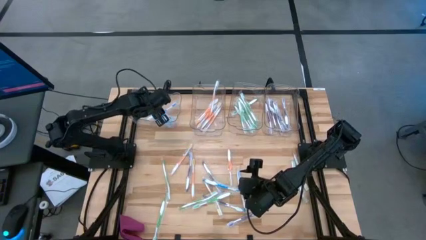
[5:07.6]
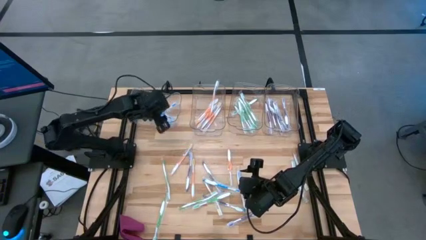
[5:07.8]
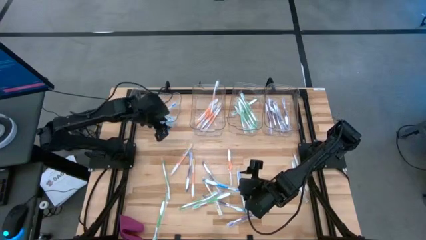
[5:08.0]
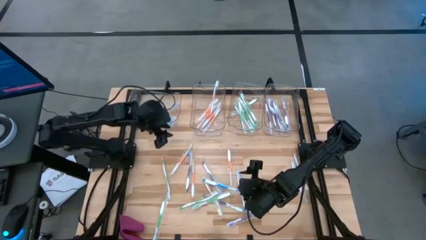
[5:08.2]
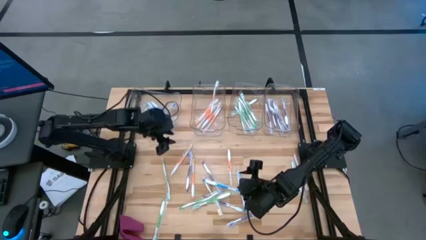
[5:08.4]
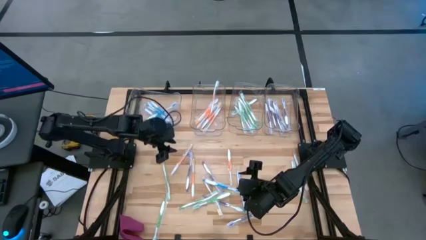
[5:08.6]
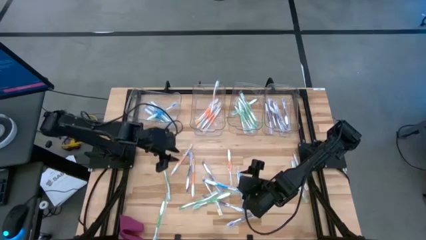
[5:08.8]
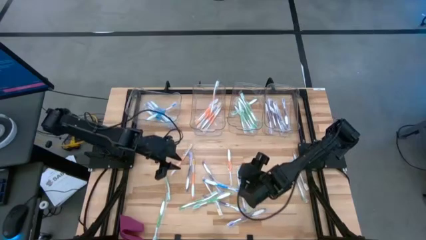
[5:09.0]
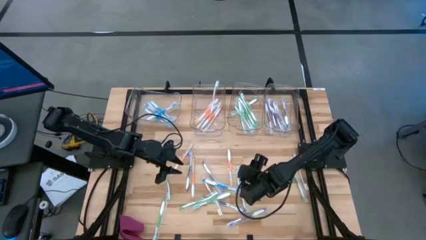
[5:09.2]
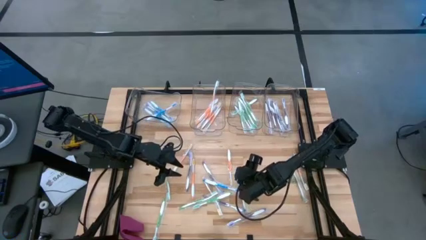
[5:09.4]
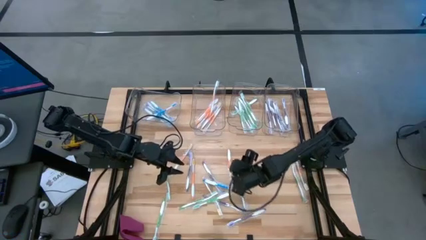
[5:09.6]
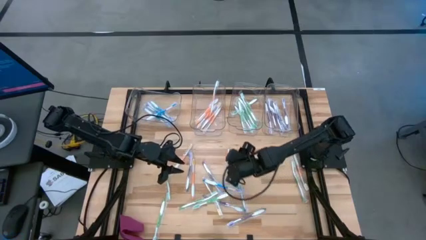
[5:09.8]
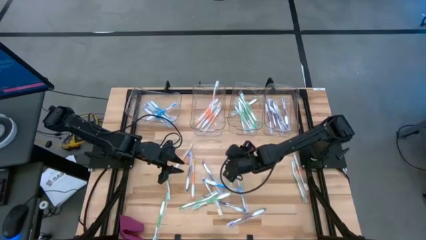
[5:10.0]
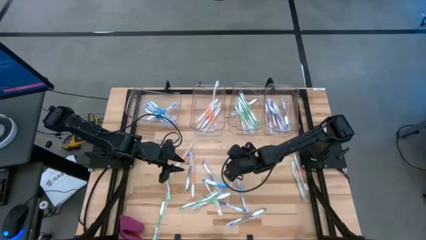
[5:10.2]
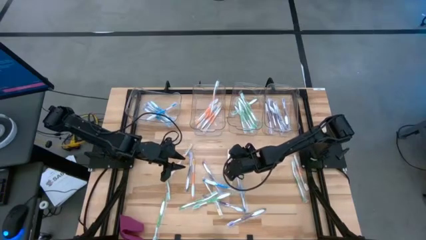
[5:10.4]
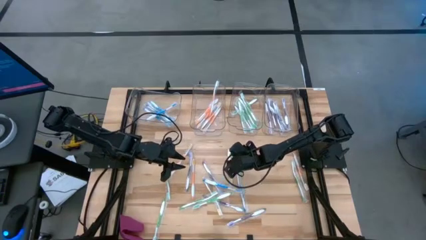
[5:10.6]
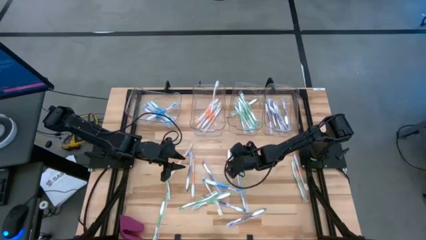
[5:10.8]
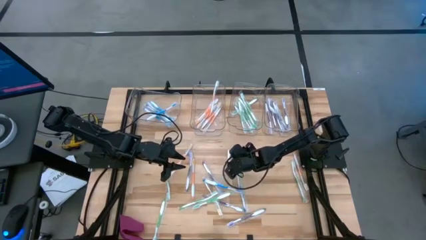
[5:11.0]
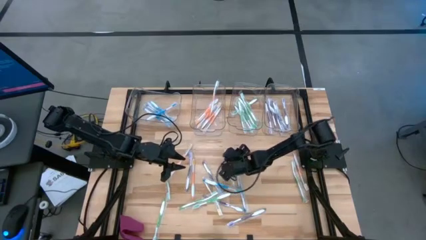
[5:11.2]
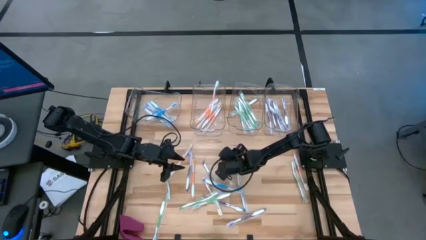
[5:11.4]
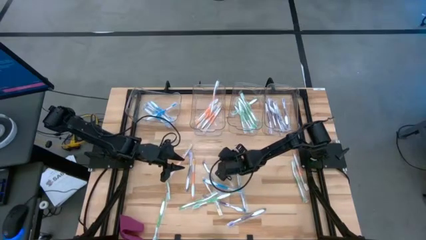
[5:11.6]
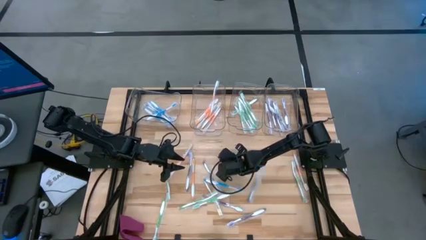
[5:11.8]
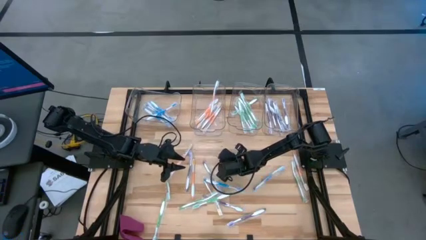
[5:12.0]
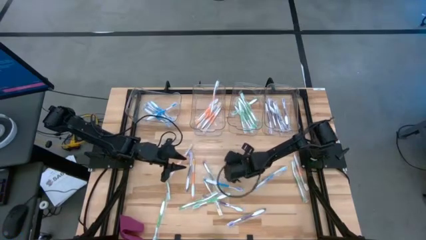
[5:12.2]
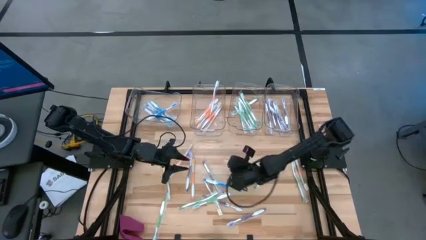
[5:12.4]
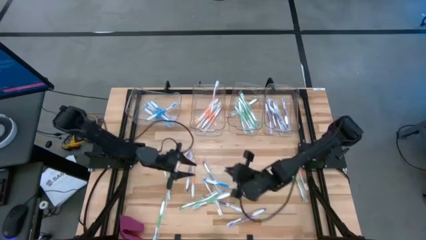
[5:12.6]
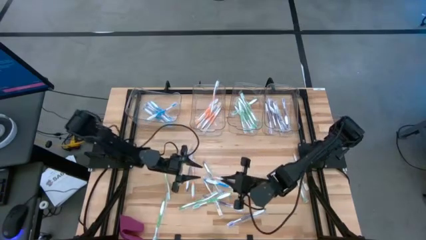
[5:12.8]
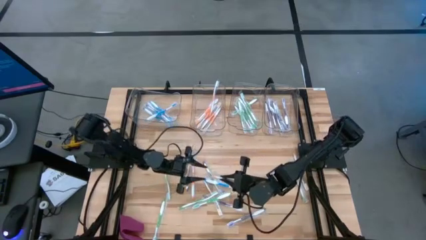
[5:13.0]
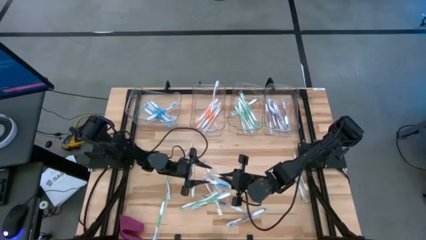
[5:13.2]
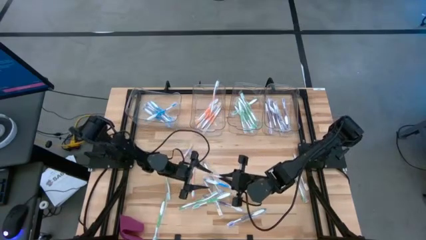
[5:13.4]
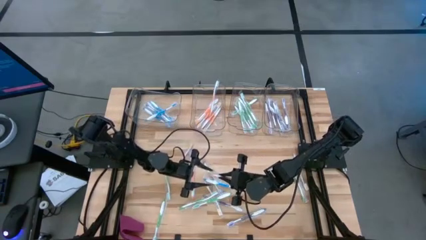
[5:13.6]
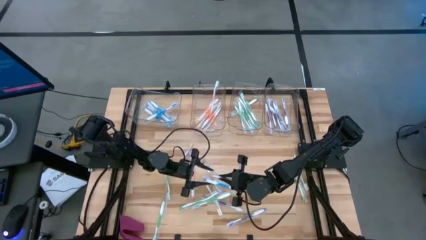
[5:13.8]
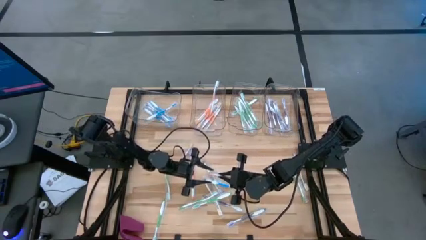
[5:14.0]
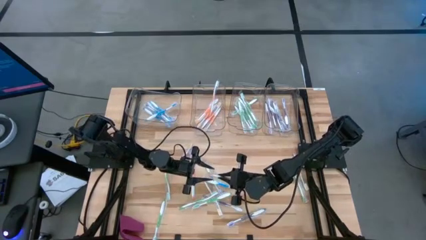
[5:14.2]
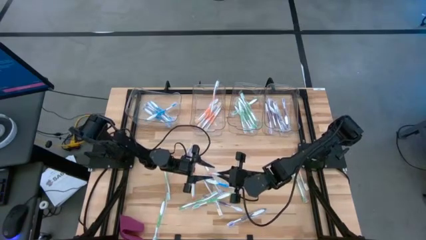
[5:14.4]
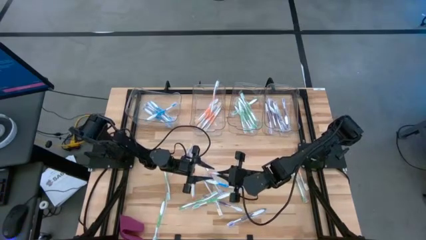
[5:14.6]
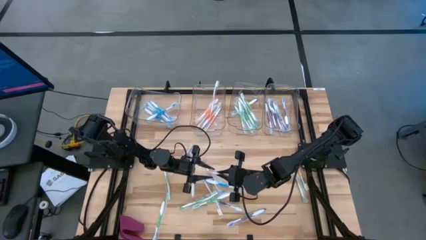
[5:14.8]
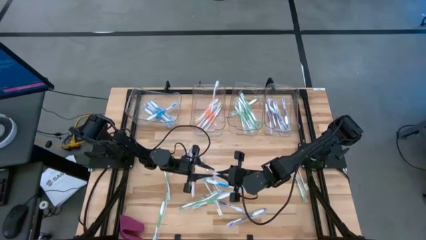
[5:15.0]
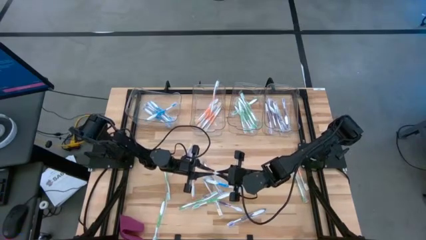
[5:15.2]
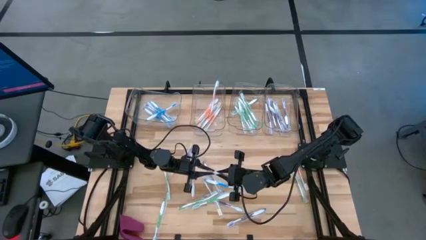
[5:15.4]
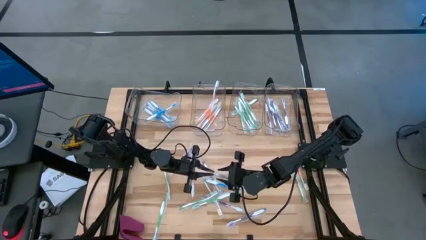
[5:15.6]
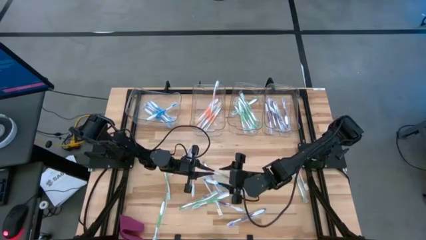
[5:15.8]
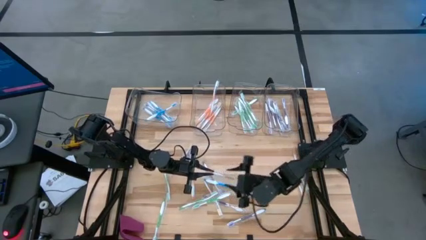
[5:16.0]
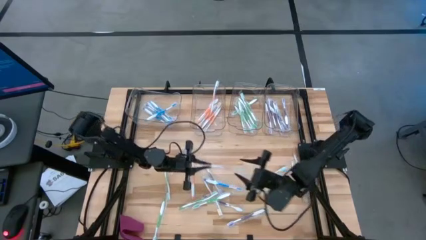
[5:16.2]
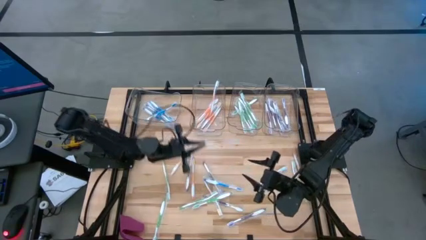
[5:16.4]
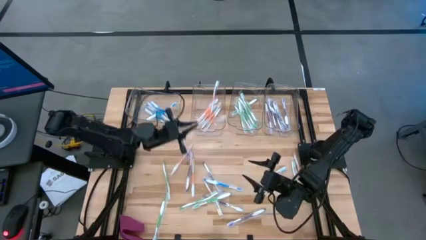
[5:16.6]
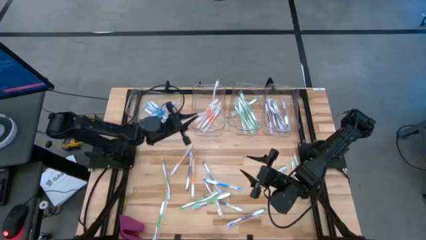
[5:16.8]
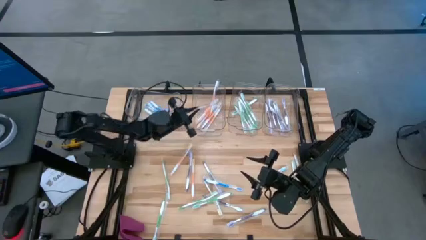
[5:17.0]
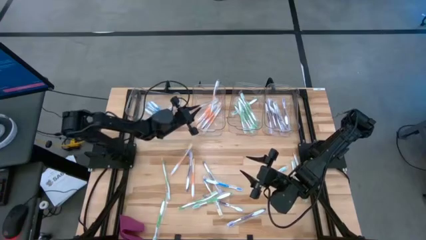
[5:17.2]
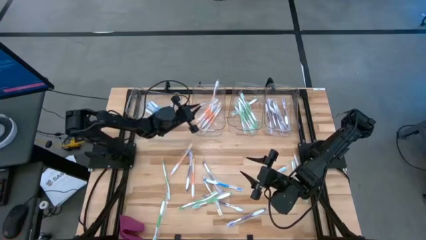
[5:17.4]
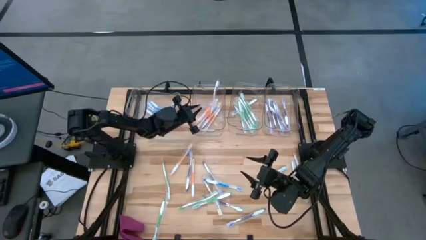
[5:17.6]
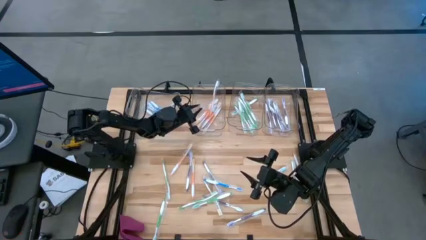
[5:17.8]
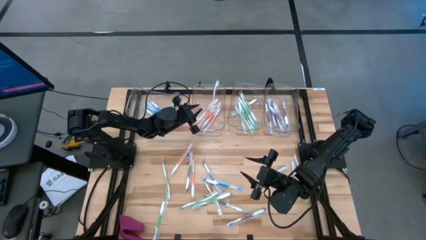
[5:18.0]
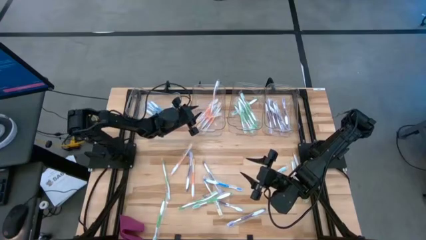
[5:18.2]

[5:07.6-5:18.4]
Task: Pick & Place Toothbrushes
Put the orange toothbrush into the middle left transparent bin

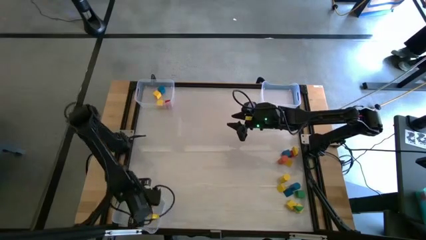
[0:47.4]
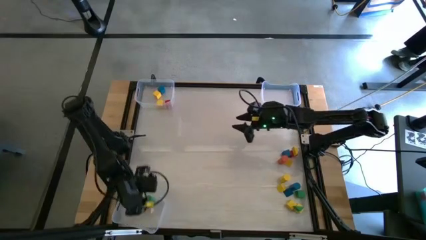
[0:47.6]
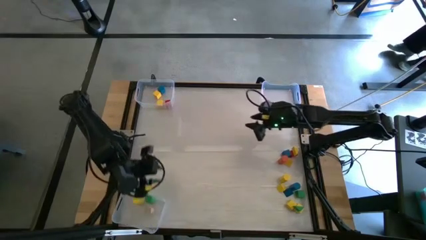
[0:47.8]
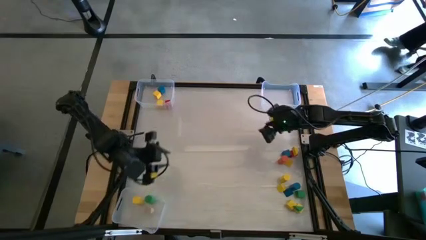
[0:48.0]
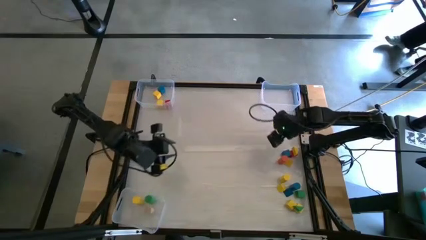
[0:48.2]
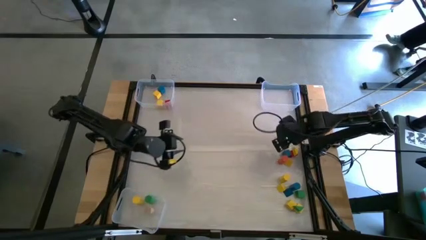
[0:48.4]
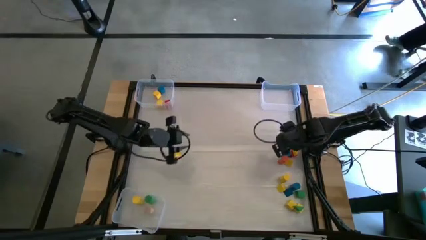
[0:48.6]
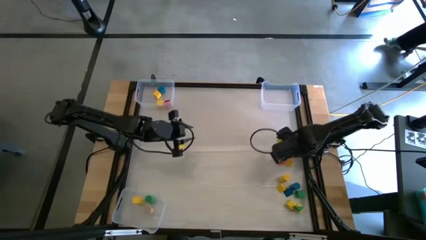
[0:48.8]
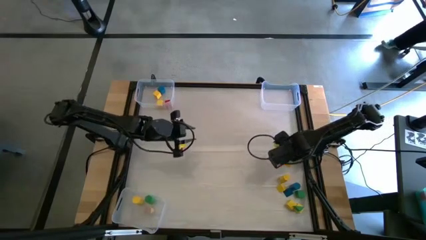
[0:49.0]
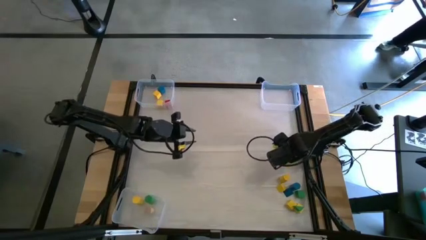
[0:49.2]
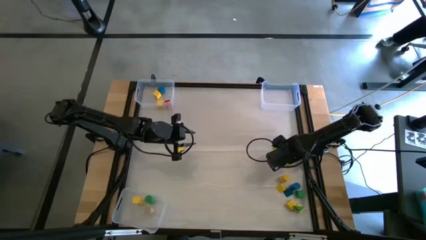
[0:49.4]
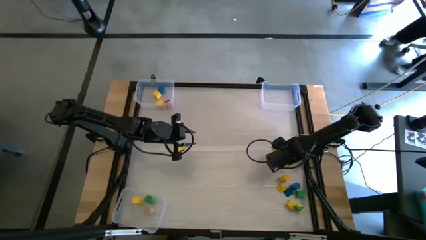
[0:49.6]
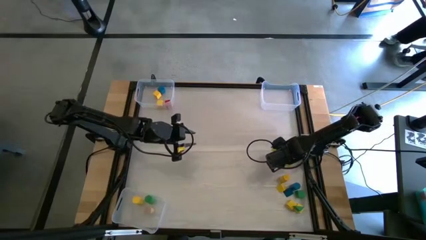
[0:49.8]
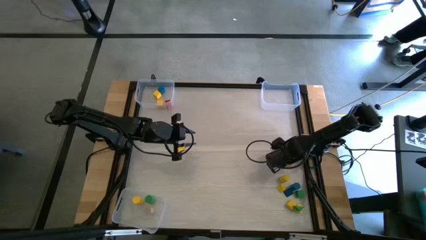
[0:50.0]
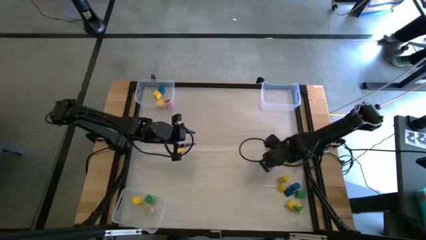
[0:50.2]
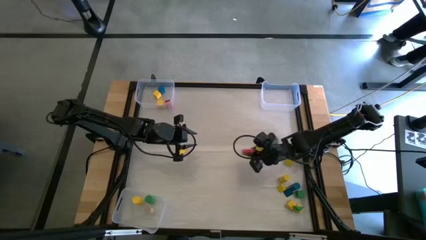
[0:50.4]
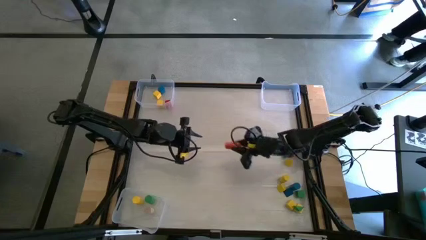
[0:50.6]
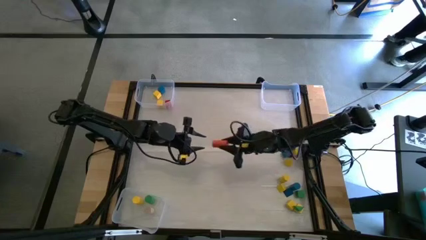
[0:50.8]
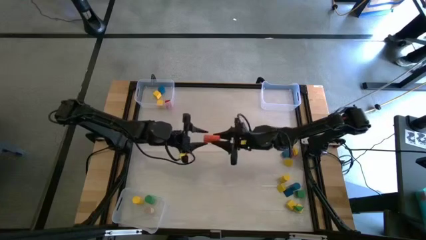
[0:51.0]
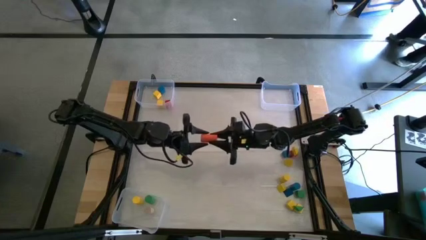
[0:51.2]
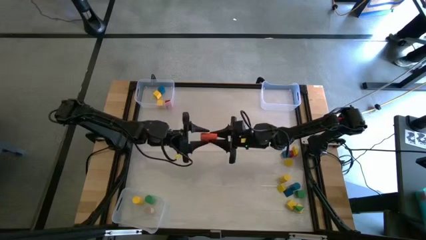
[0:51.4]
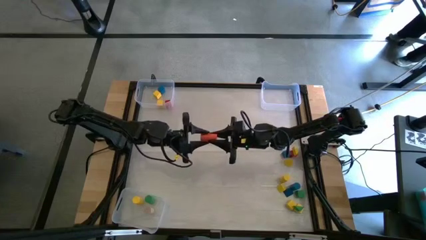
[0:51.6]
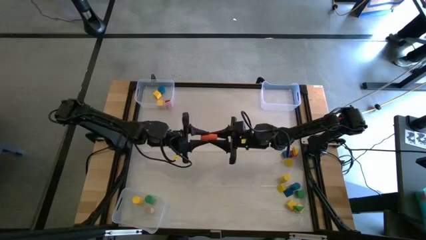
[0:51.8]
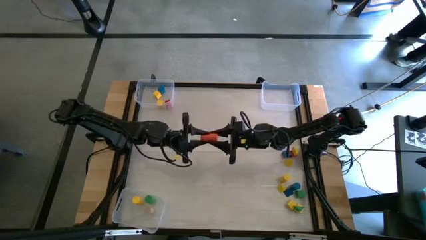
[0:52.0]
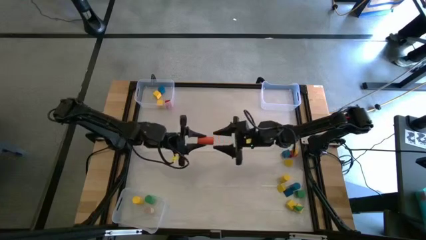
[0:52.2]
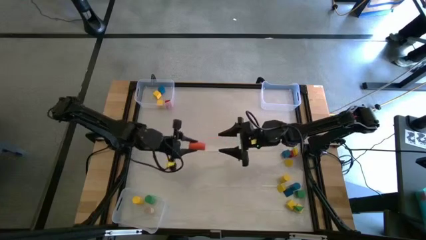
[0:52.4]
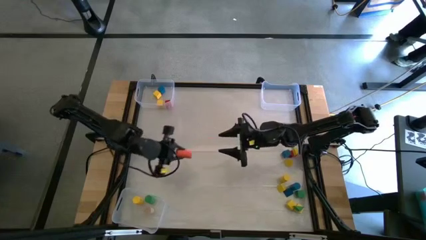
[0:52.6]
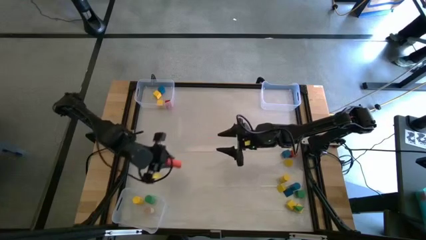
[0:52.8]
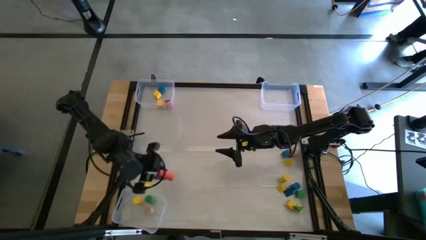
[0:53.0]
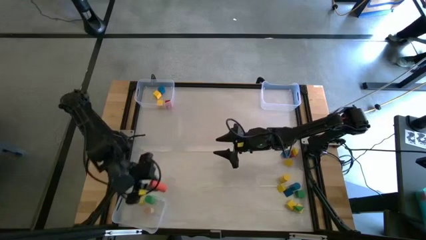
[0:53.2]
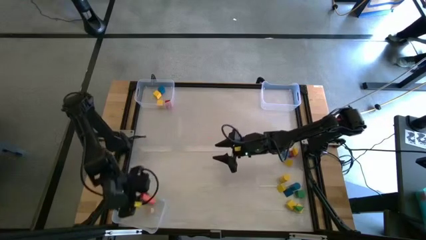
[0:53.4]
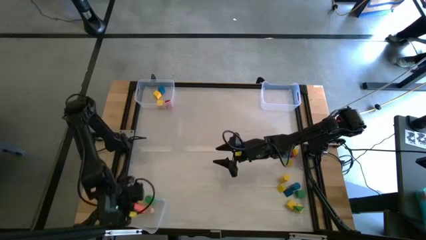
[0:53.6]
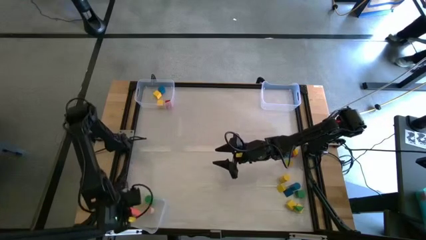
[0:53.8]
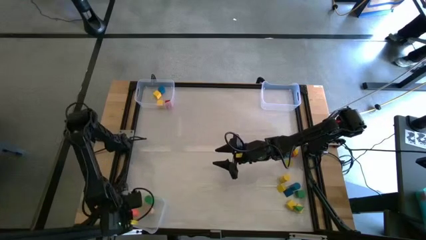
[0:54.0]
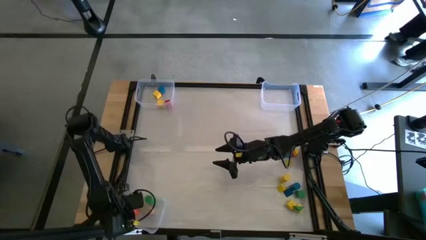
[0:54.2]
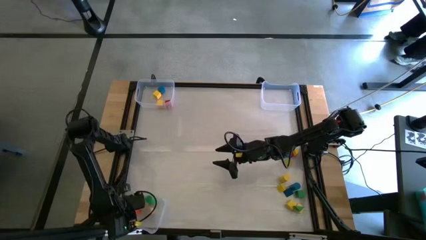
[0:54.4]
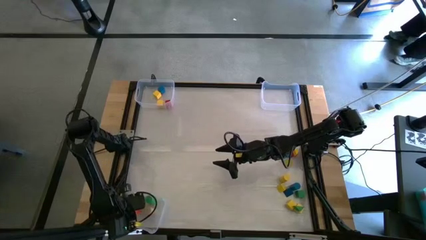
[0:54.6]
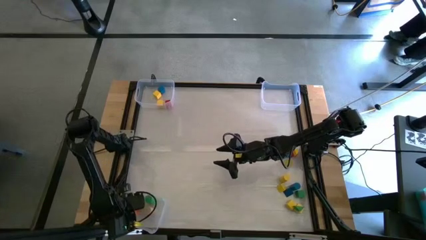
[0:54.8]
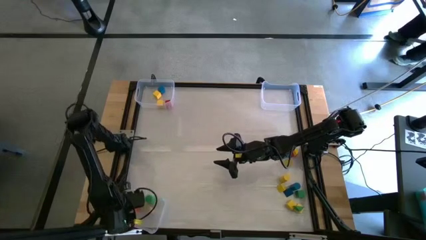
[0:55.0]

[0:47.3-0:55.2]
Task: Sort blocks by size
Put the right orange cylinder block into the bottom transparent bin
